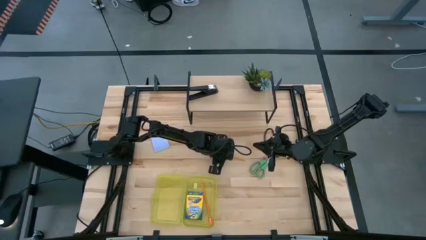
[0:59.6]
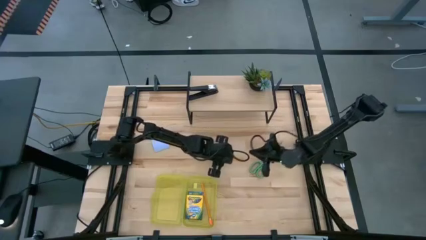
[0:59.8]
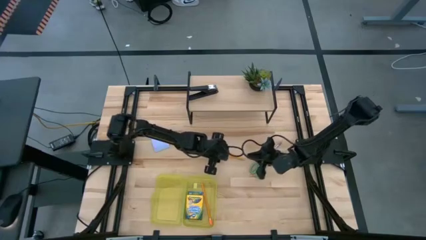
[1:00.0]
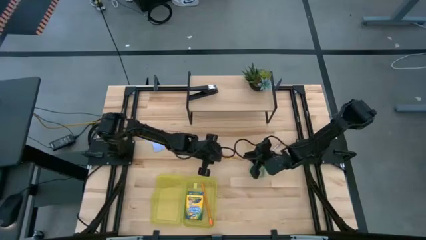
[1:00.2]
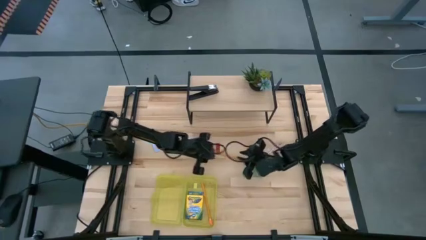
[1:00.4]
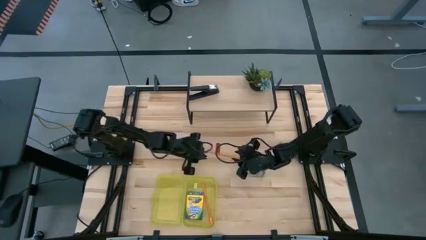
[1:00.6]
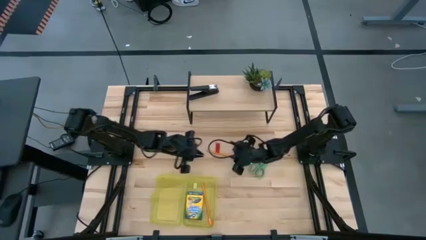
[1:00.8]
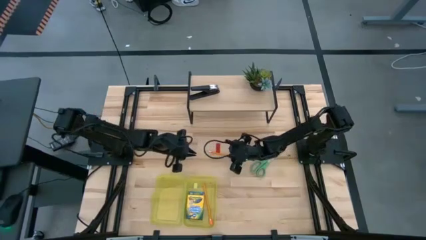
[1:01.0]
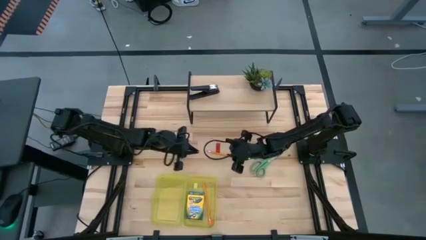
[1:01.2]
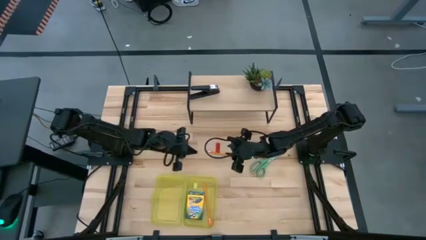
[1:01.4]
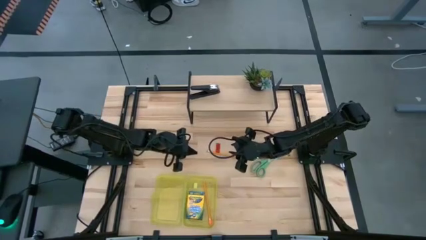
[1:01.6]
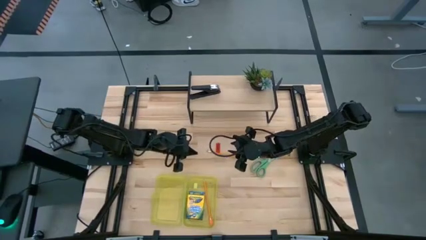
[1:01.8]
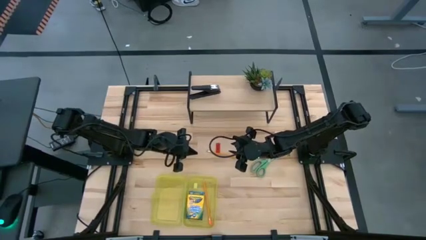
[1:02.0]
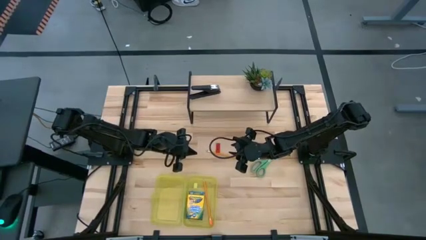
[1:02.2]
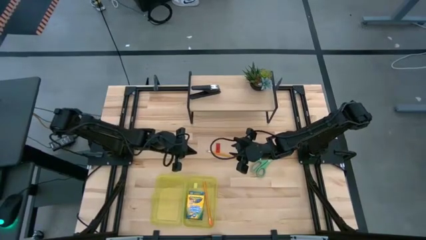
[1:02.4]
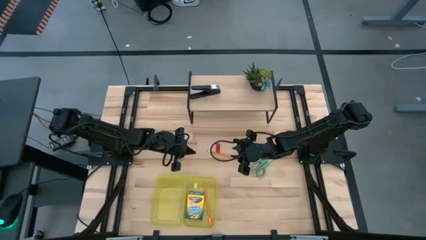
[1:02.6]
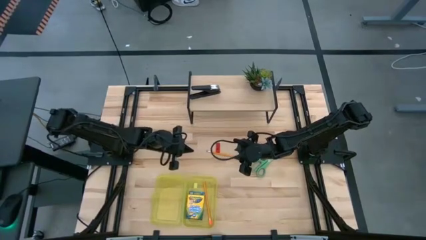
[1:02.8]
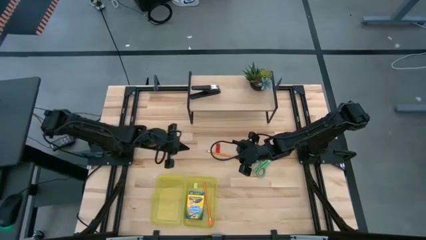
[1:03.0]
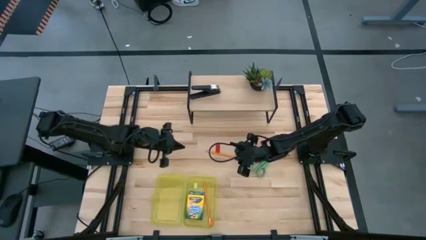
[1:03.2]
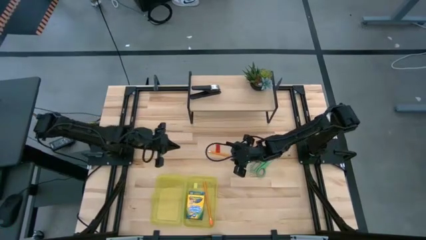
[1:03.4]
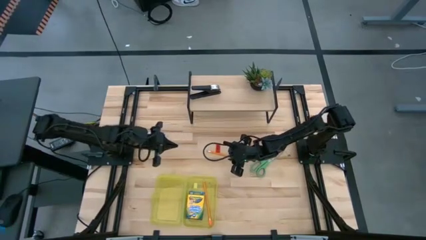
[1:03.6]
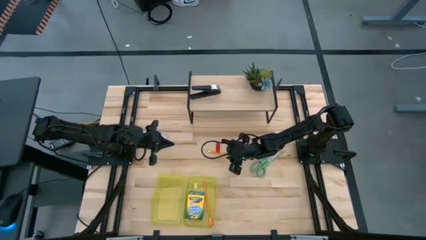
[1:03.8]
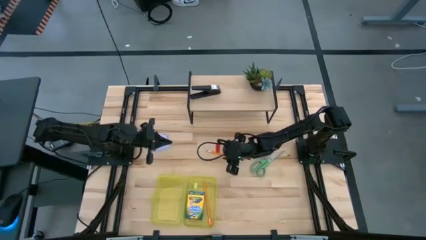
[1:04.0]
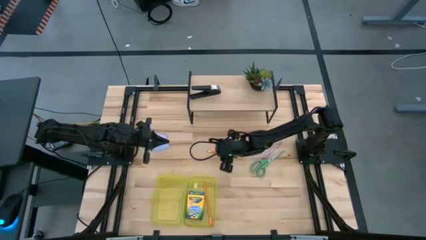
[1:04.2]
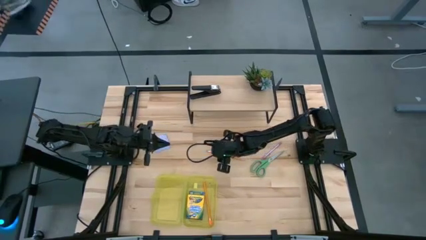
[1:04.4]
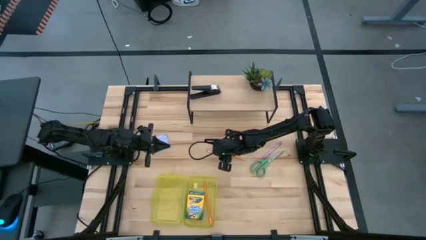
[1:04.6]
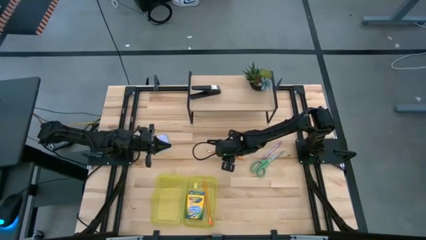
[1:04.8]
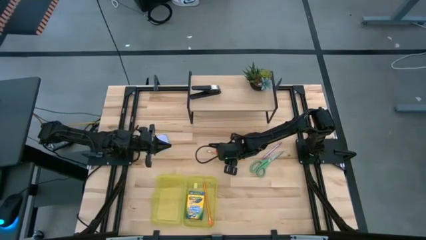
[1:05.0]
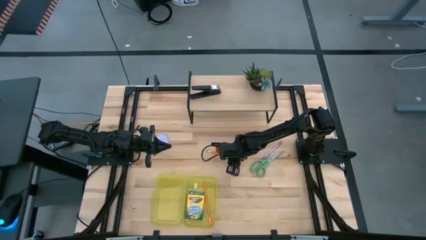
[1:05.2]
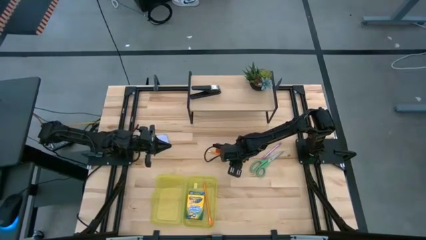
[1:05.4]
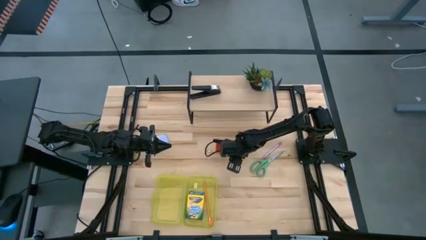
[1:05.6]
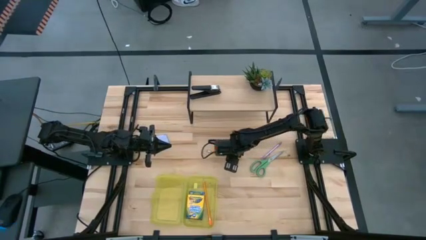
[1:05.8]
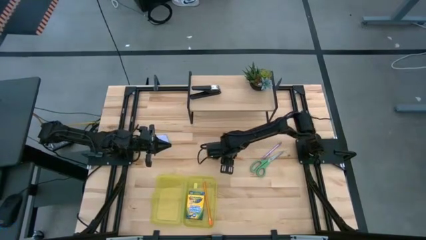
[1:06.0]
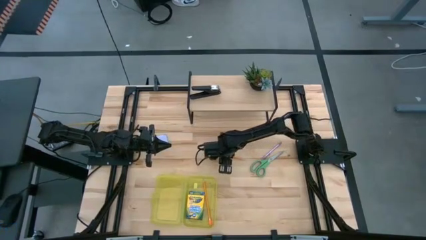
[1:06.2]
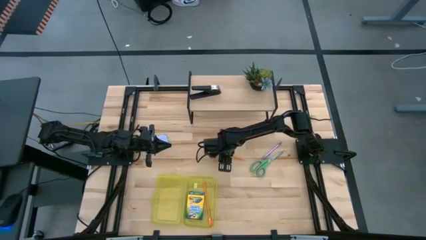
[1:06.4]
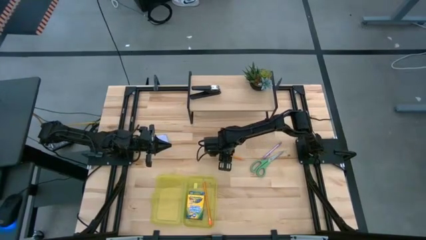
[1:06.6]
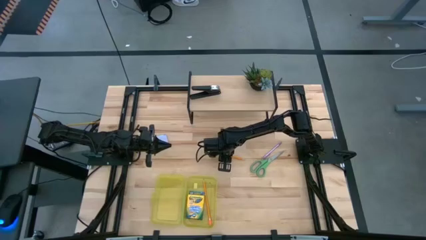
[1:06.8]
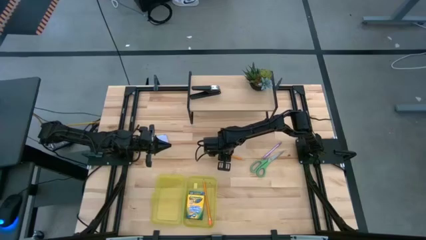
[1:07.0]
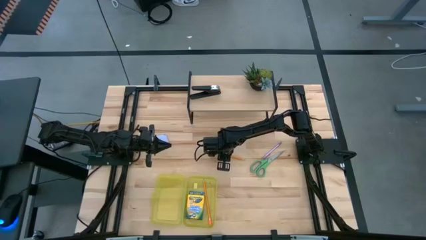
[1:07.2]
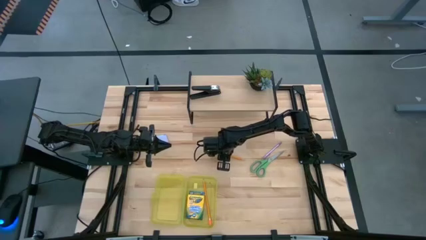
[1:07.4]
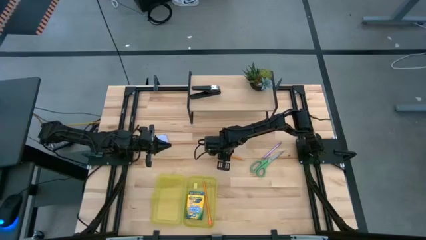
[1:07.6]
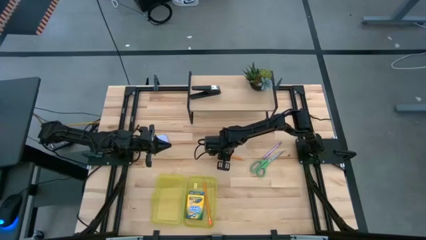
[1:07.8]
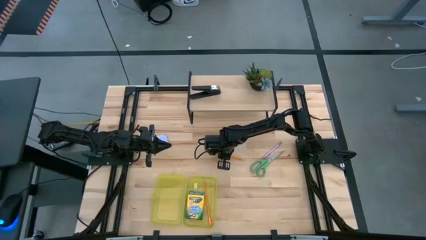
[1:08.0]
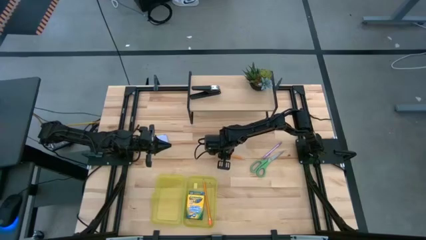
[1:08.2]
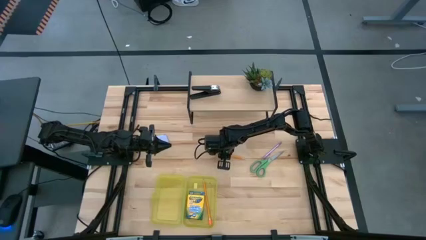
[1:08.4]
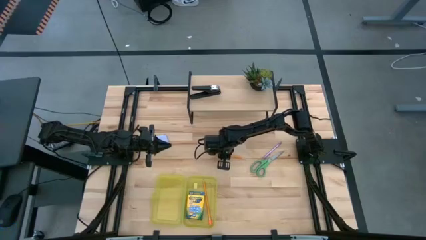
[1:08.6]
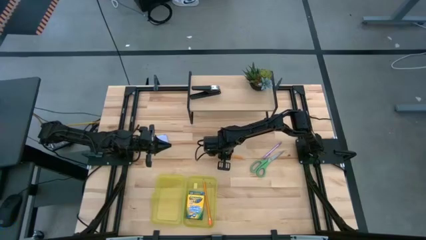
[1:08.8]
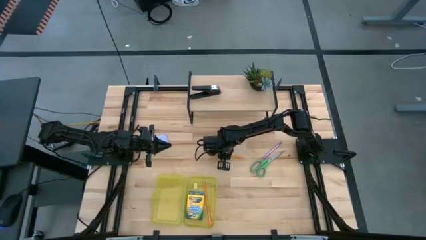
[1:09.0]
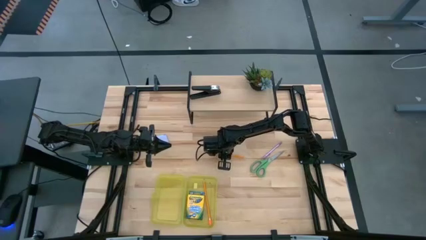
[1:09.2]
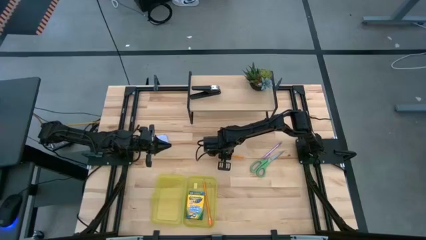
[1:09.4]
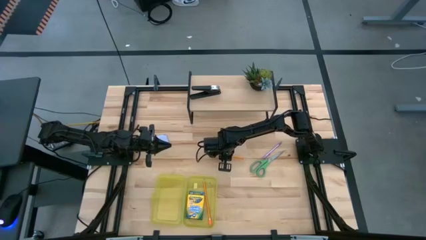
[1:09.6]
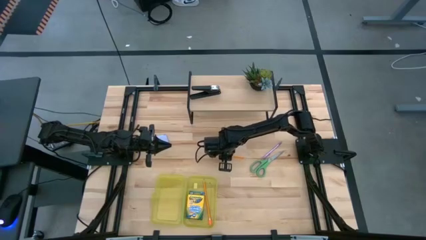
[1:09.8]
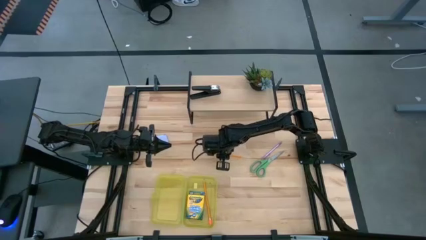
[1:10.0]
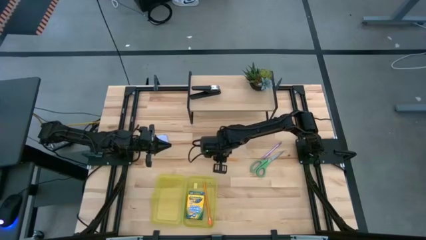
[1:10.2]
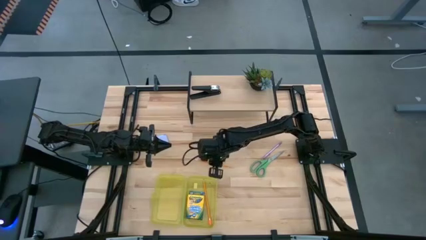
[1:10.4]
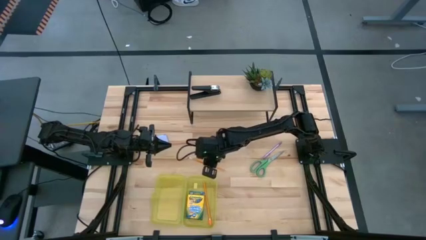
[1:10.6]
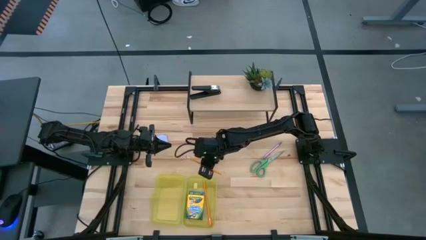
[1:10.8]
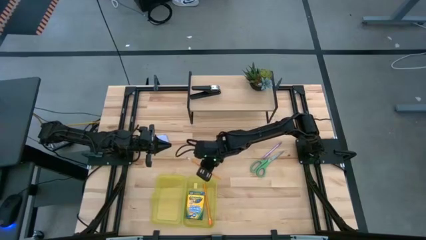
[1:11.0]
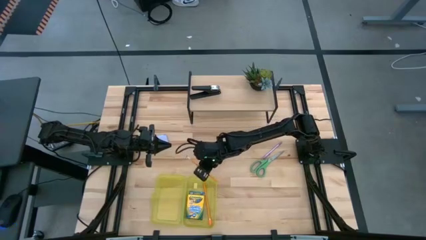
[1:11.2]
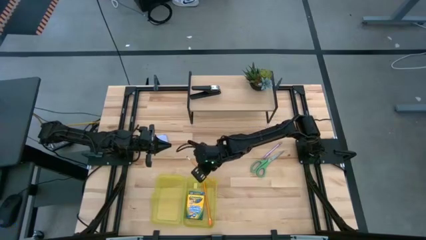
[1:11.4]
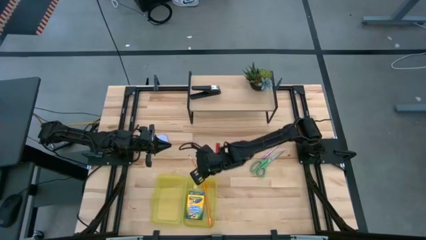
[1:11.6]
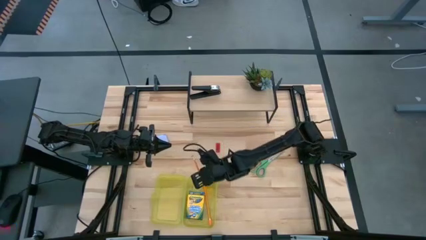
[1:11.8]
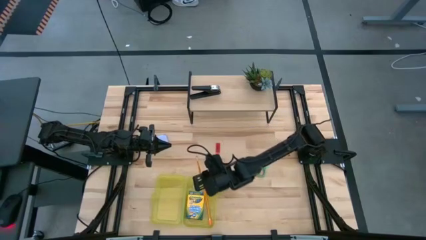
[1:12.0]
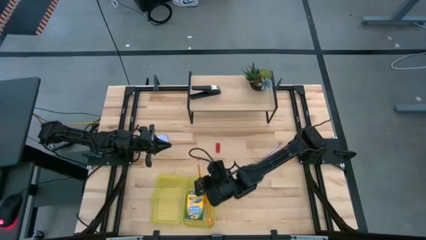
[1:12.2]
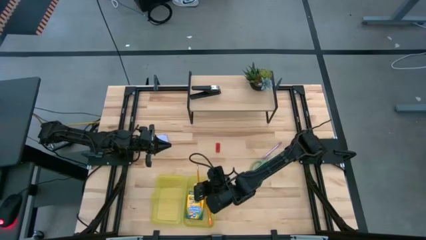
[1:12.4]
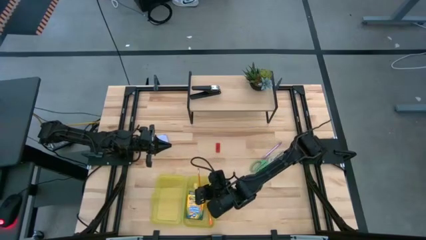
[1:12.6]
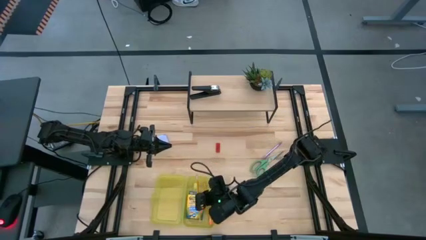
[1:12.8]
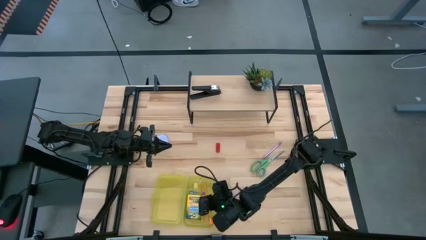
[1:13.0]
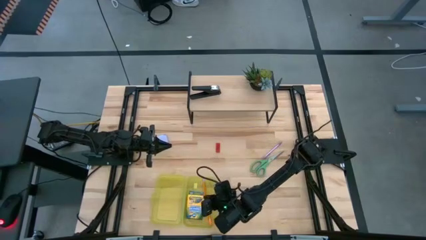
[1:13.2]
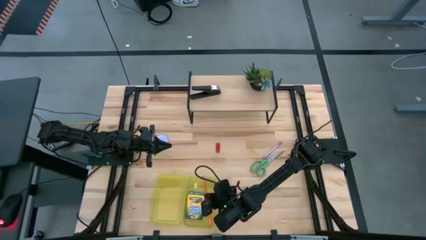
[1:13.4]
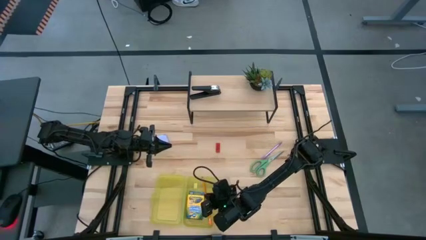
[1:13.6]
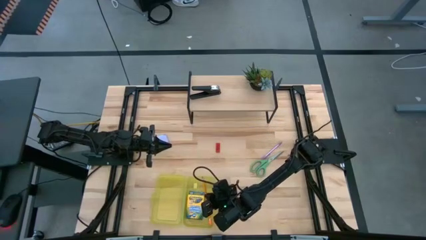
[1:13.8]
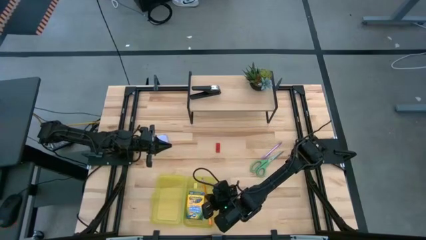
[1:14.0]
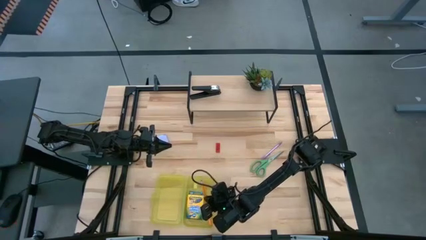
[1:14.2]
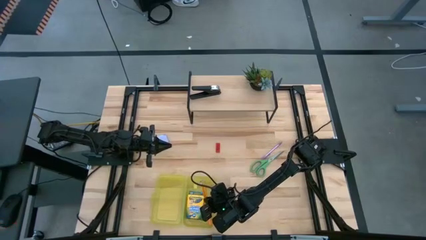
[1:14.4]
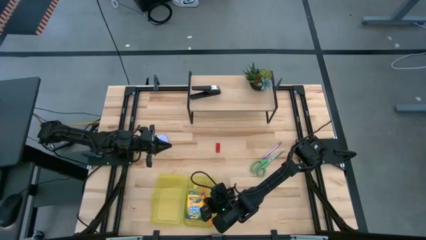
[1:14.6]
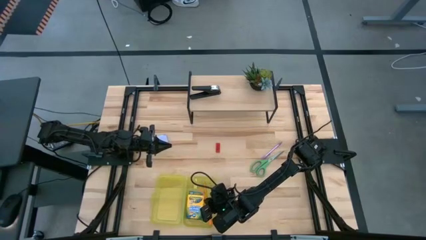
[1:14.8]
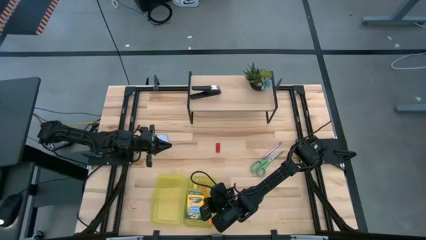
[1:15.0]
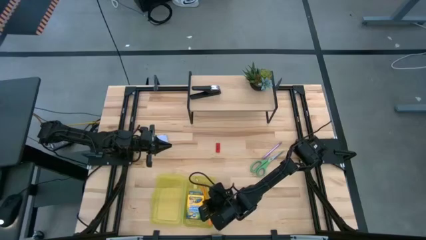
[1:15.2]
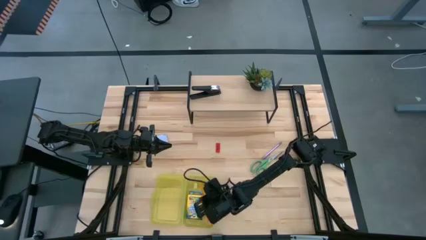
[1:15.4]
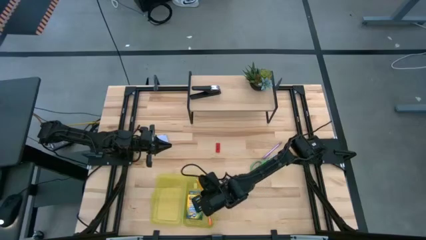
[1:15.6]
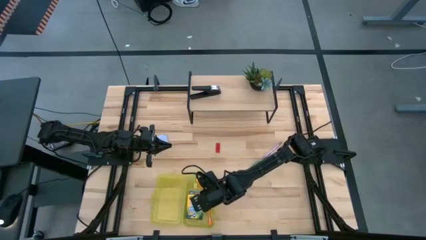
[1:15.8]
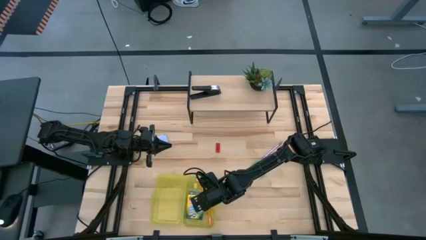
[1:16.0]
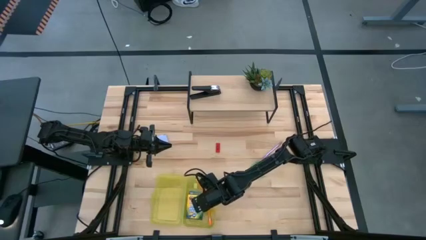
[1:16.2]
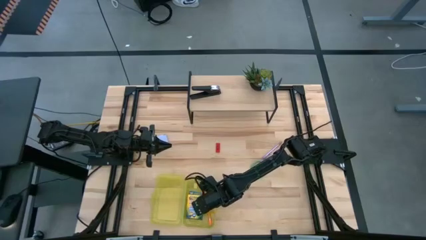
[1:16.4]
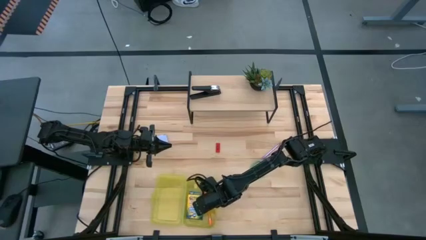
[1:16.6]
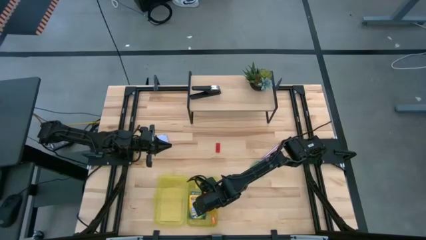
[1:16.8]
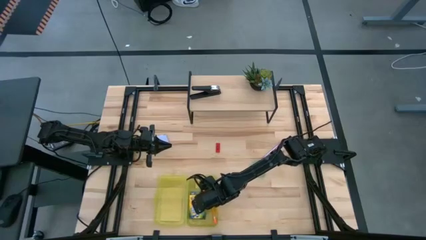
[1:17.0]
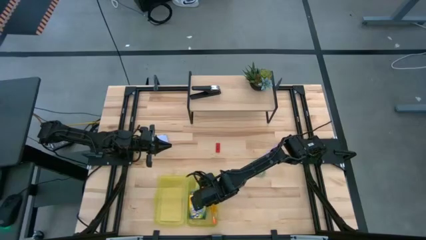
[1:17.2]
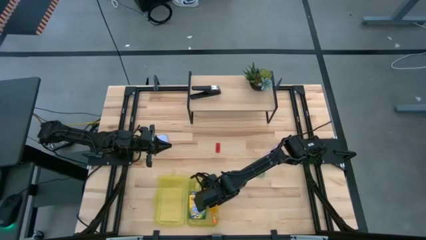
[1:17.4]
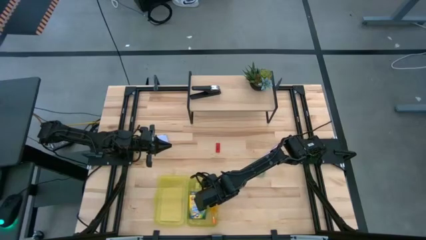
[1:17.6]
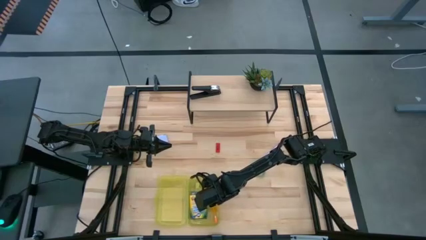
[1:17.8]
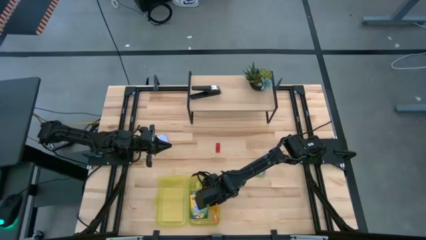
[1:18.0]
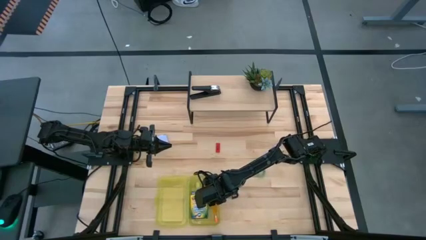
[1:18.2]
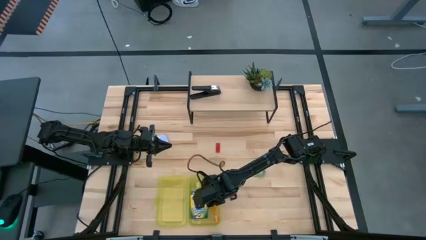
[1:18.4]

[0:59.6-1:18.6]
Task: Pack school essentials
Put the orange pencil into the yellow supply box
